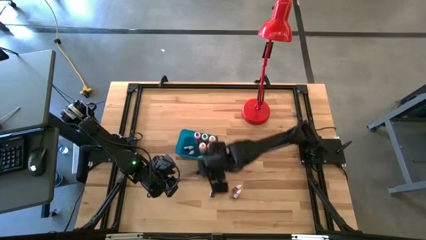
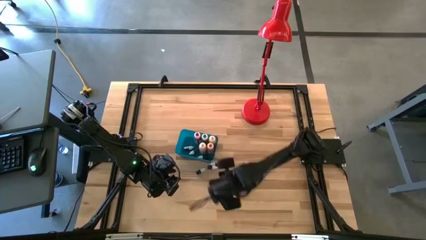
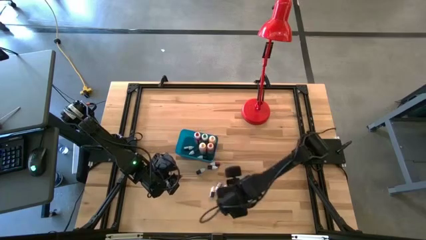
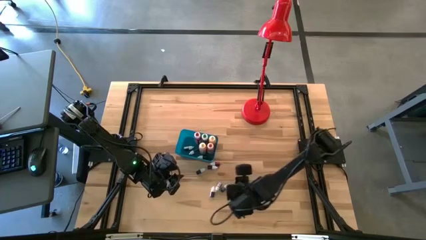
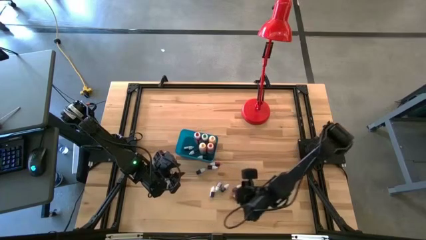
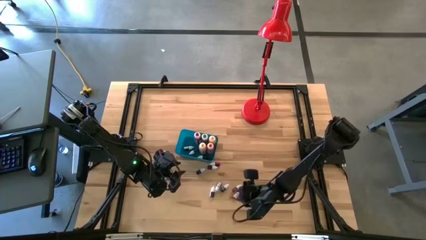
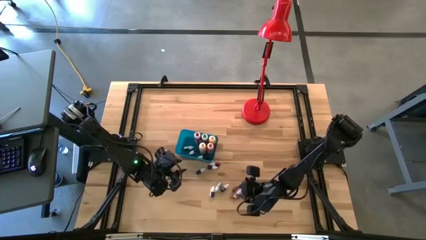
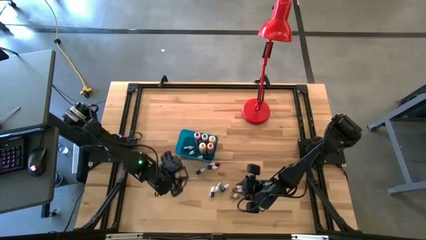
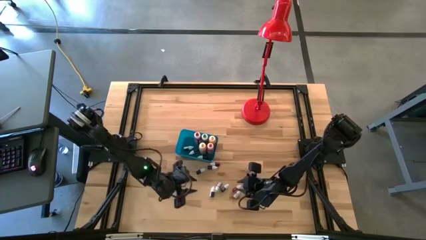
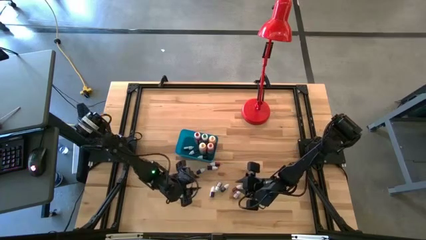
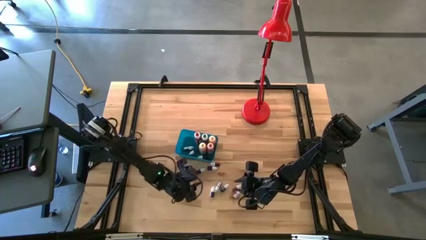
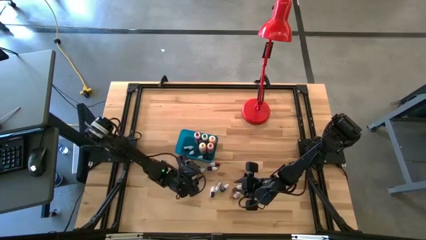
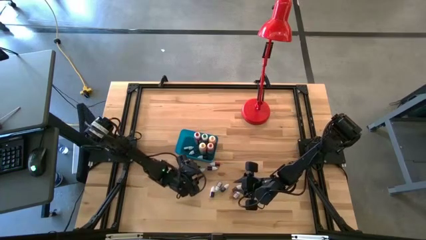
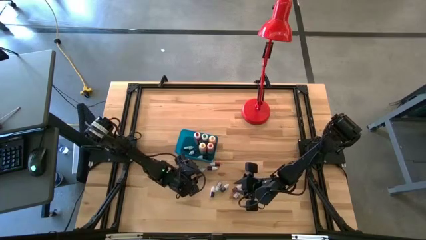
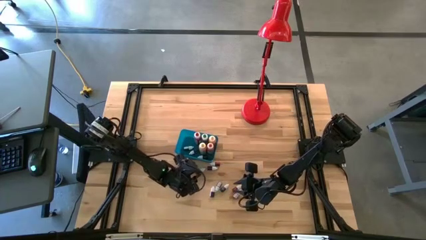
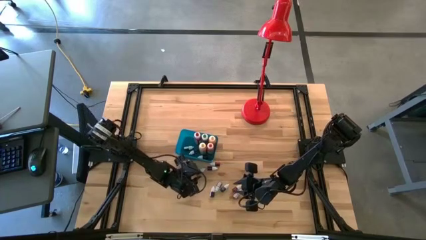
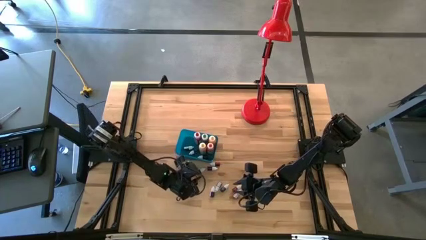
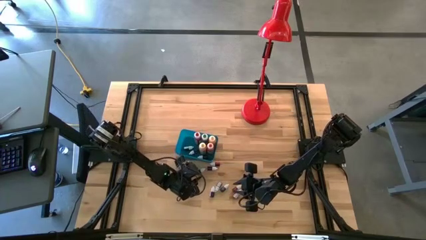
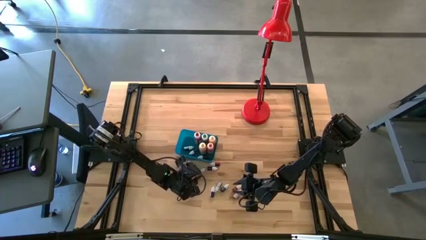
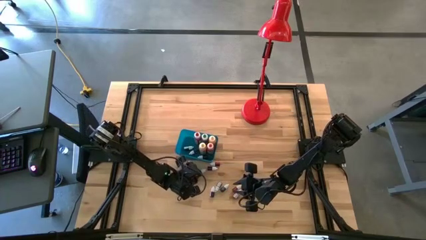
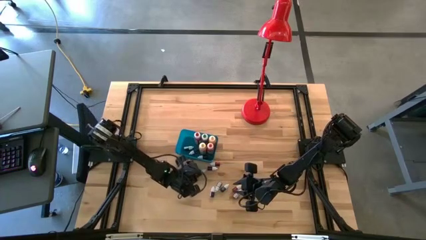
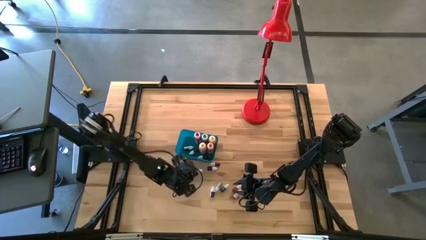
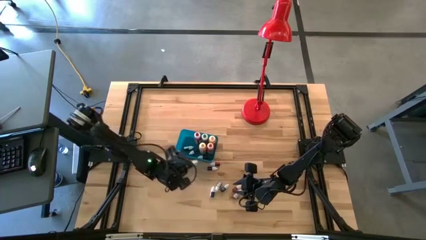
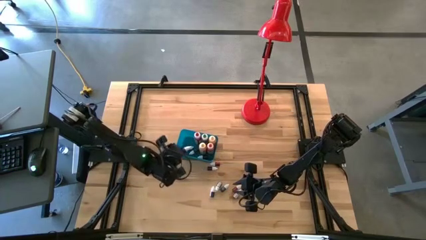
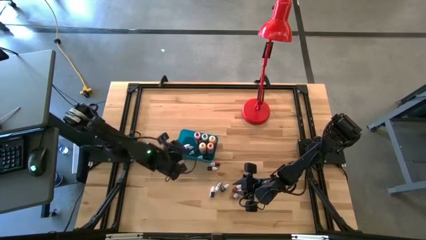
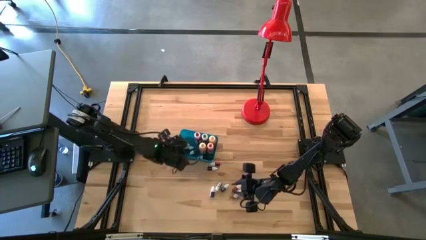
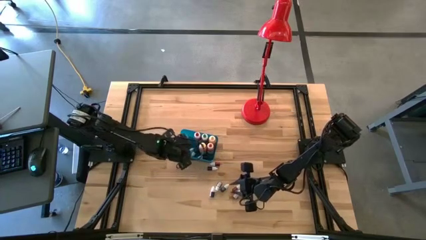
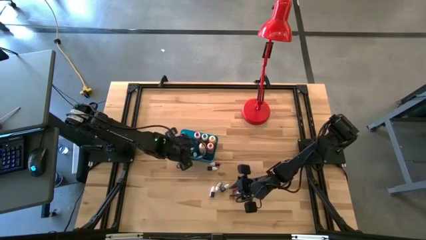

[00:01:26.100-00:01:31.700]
Task: Pick & Place food coloring
Put the small green food coloring into the blue bin

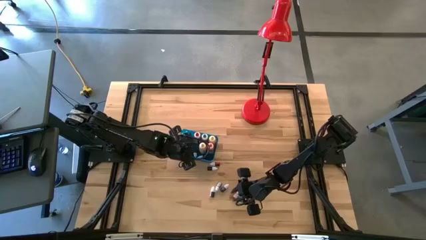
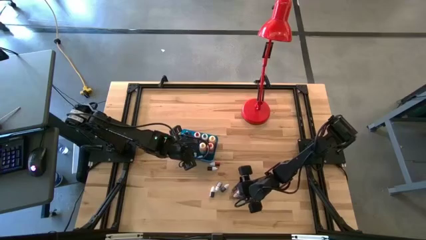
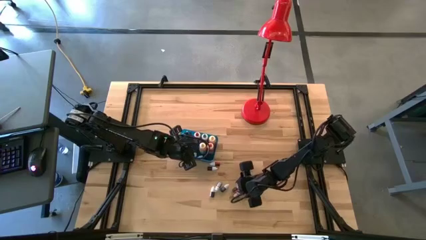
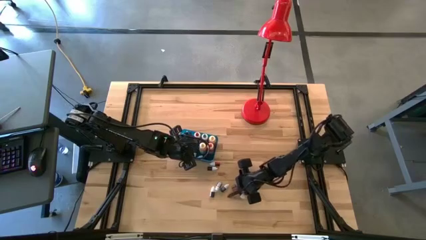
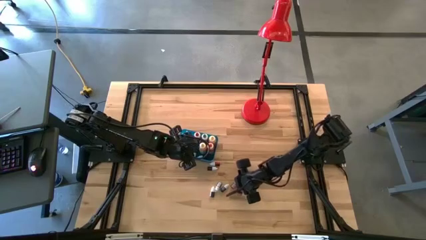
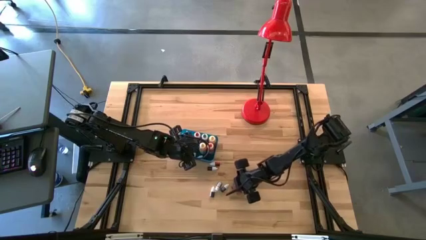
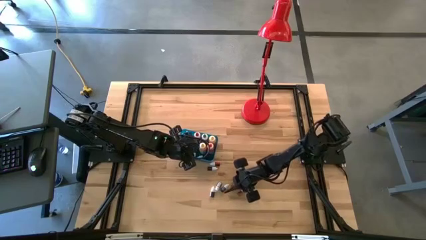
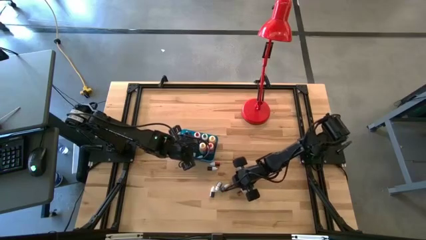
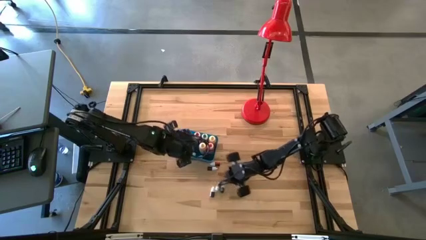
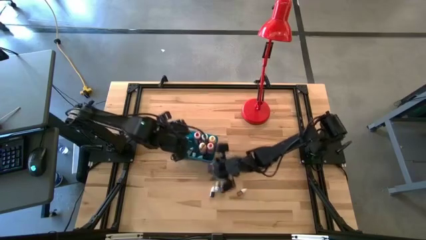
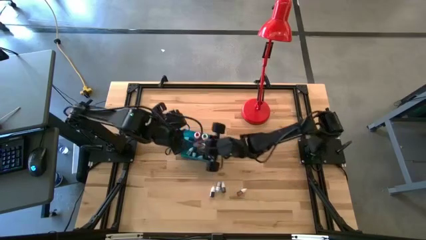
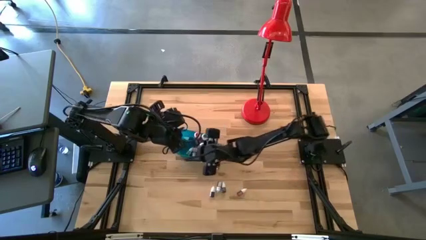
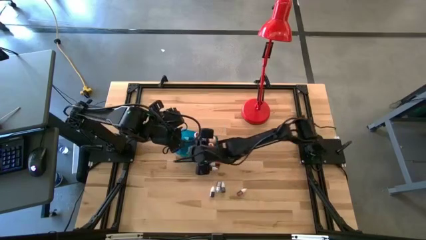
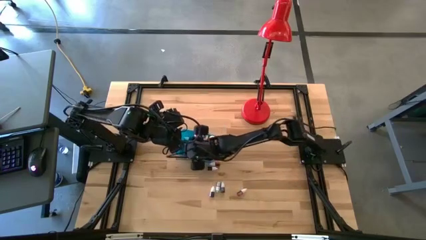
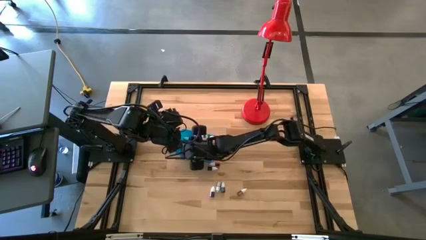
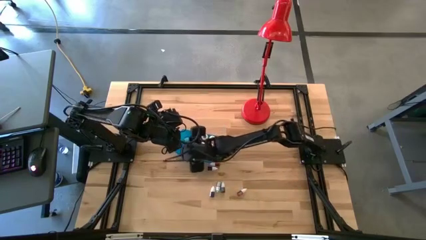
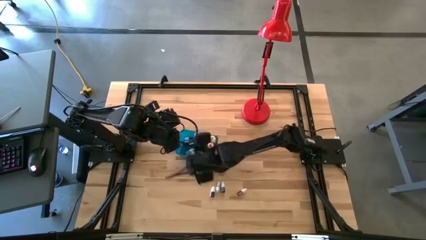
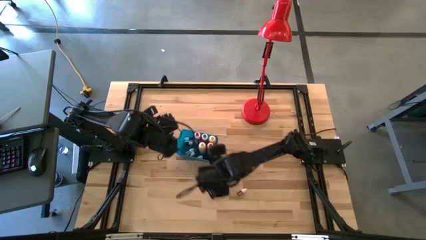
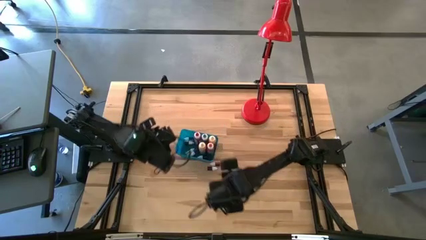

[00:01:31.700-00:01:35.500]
Put the small red food coloring into the blue bin

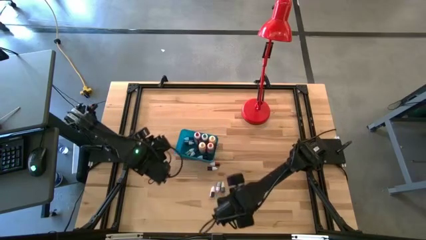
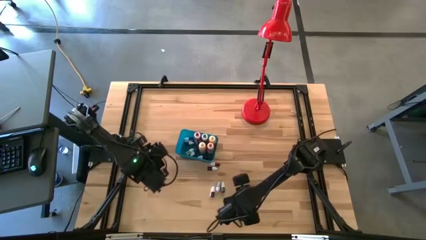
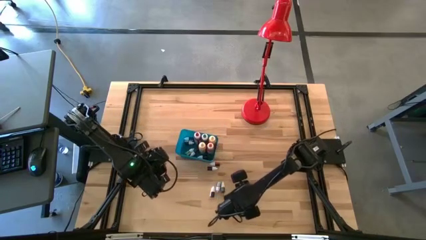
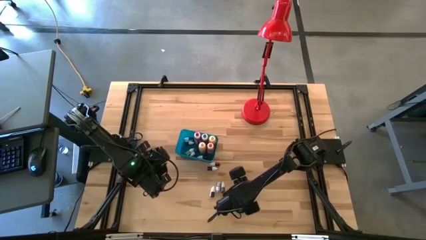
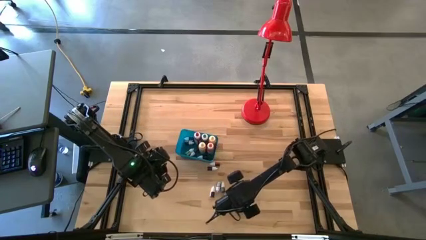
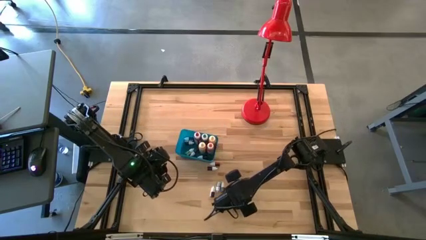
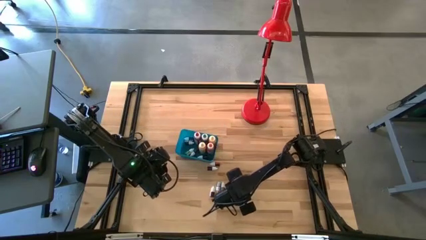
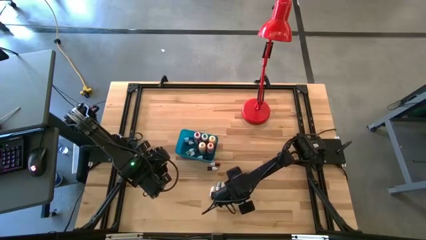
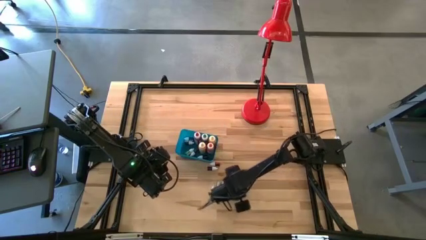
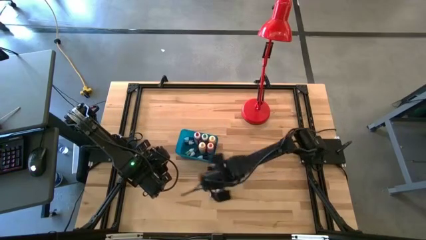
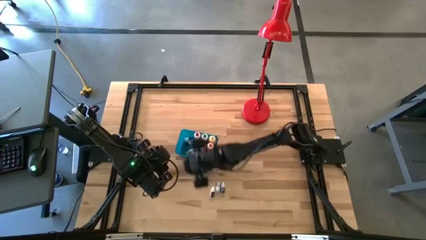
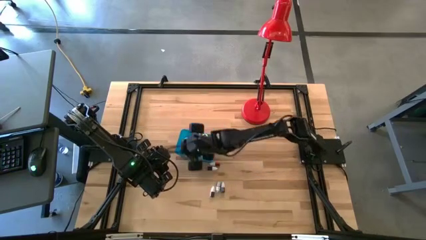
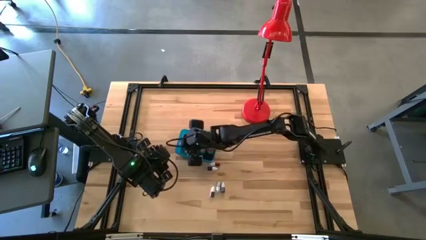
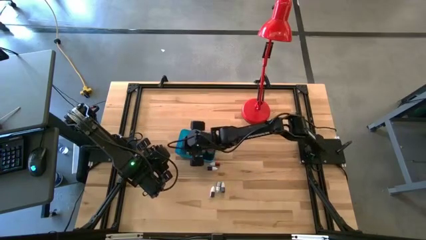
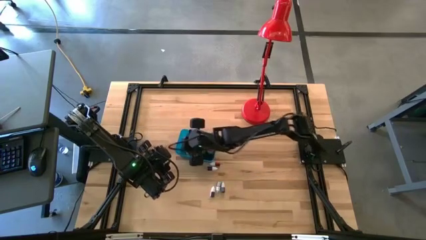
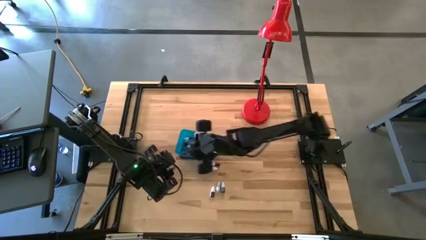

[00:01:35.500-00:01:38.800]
Put the small red food coloring into the blue bin

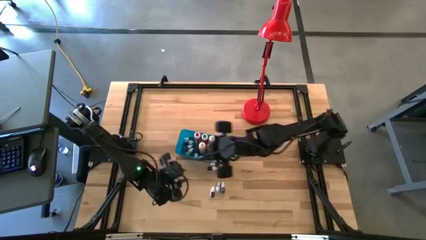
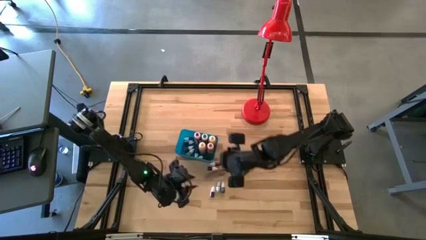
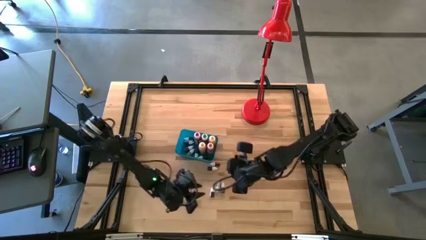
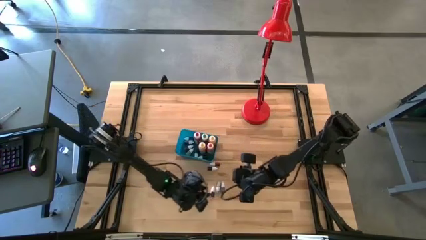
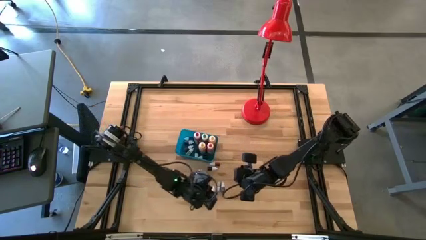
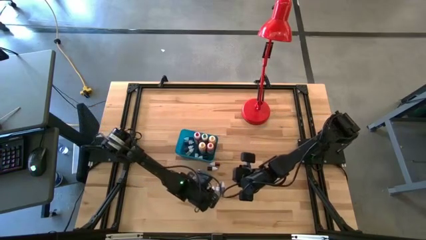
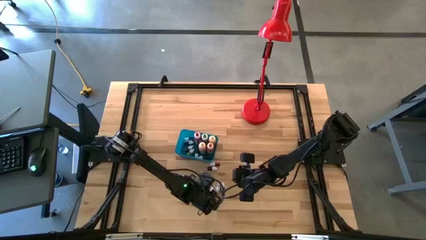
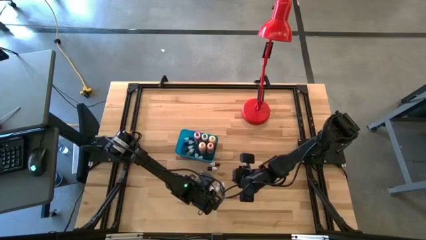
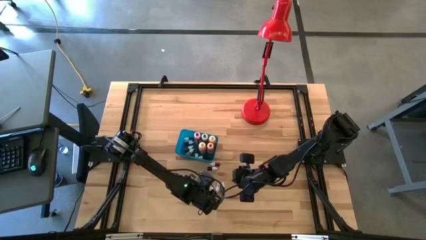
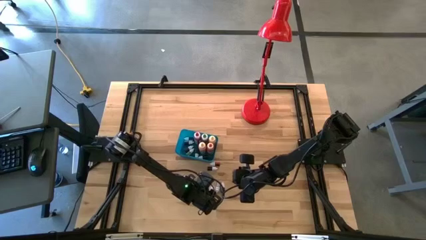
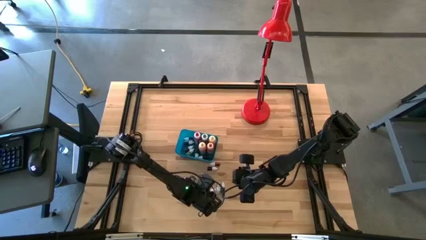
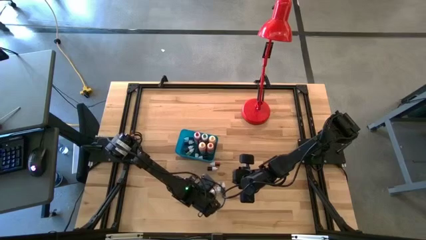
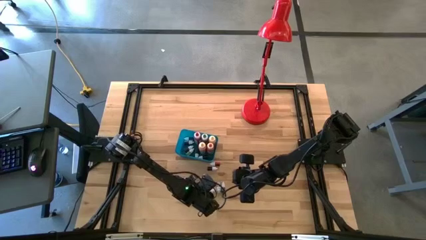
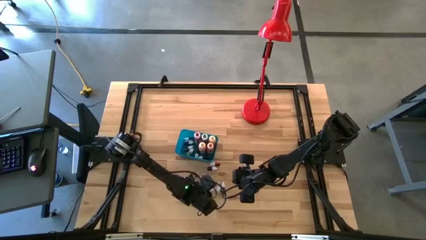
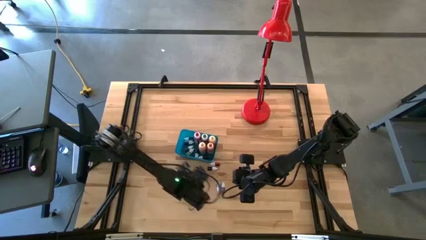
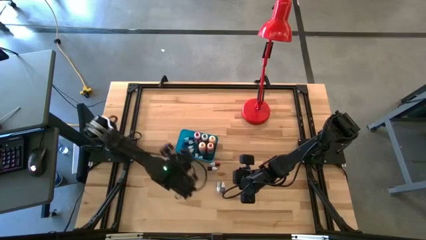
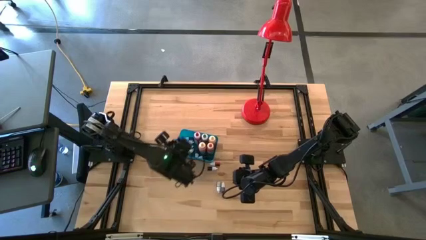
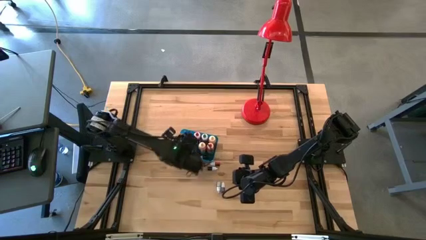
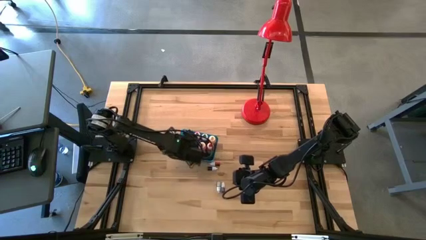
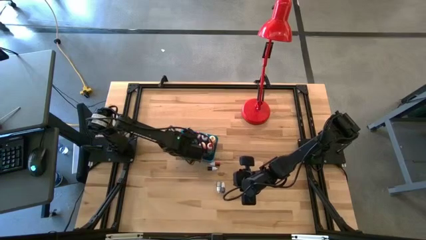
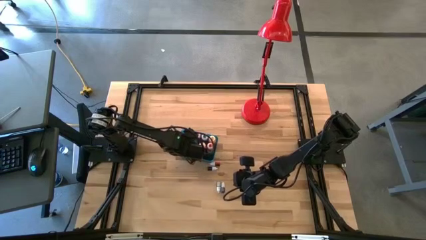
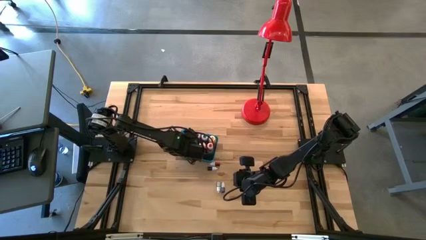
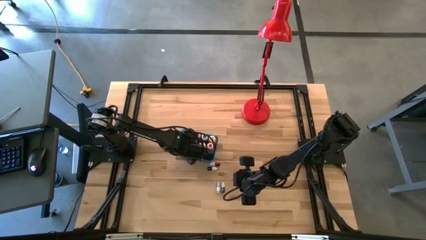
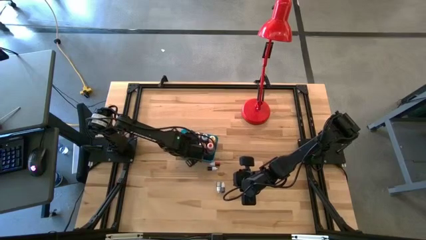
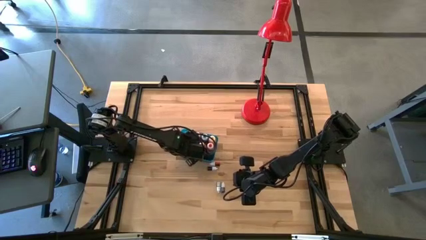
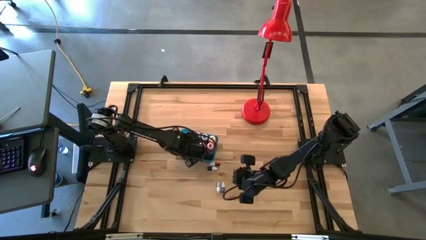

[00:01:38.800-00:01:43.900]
Put the small green food coloring into the blue bin
